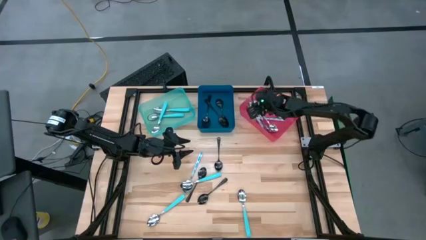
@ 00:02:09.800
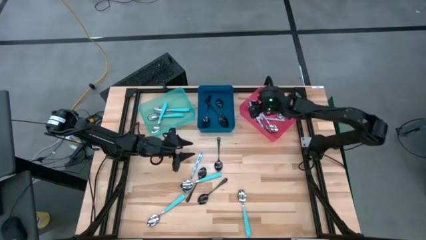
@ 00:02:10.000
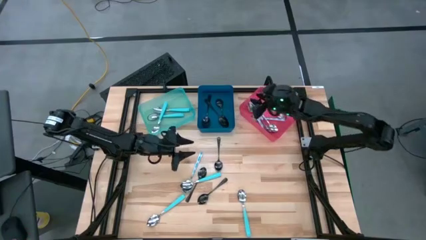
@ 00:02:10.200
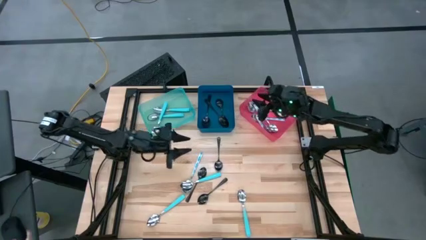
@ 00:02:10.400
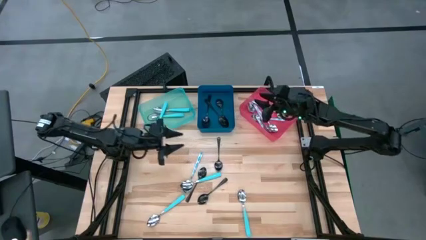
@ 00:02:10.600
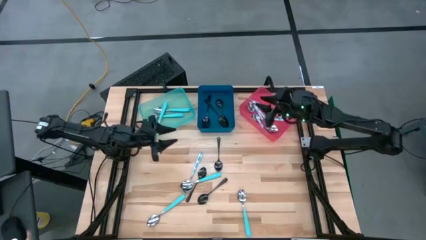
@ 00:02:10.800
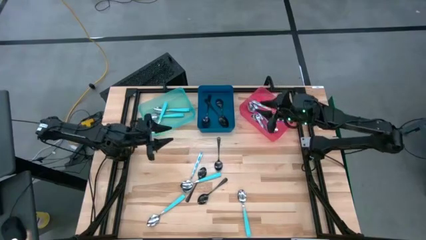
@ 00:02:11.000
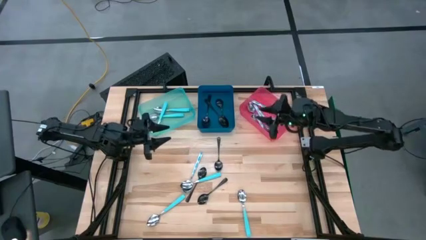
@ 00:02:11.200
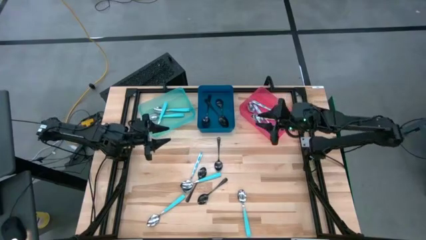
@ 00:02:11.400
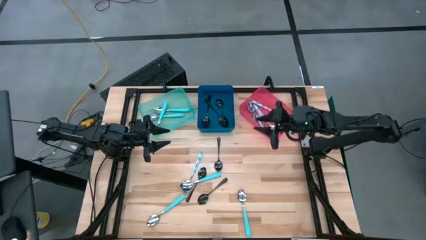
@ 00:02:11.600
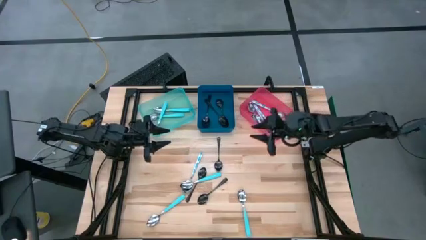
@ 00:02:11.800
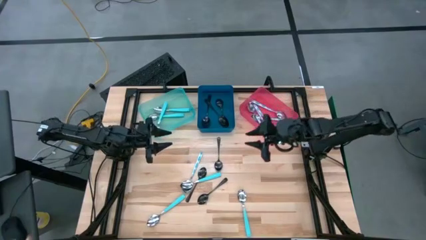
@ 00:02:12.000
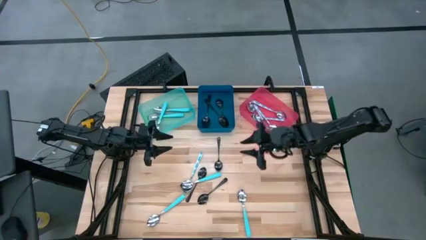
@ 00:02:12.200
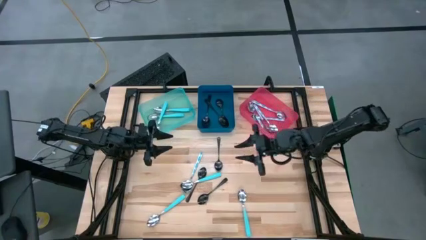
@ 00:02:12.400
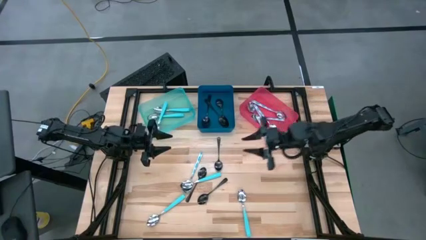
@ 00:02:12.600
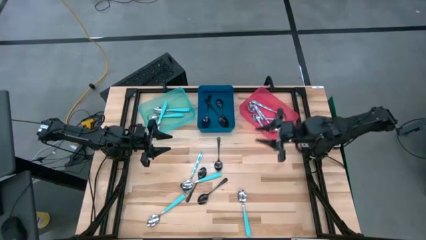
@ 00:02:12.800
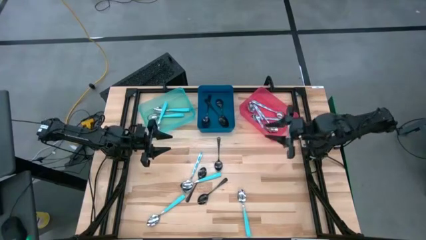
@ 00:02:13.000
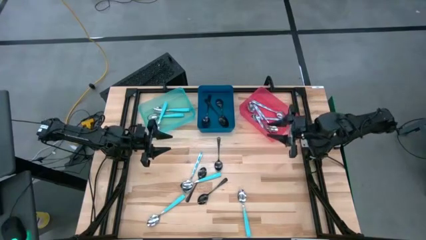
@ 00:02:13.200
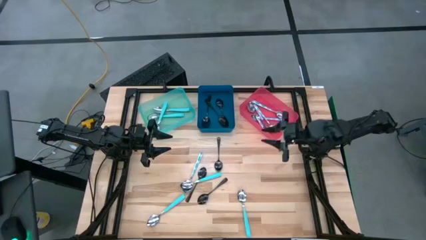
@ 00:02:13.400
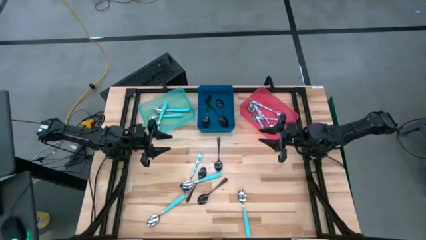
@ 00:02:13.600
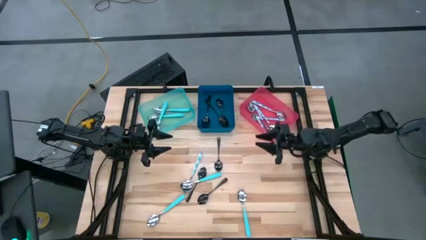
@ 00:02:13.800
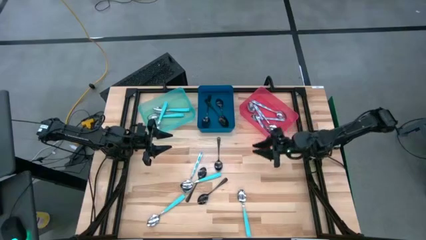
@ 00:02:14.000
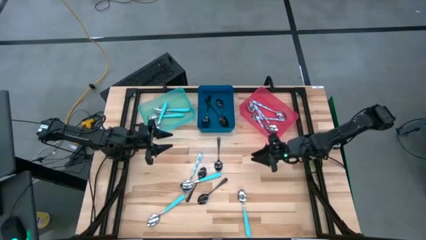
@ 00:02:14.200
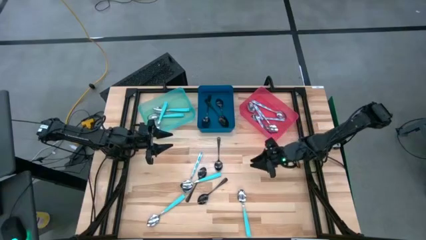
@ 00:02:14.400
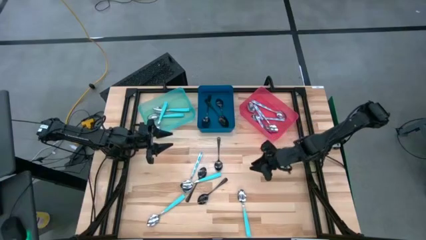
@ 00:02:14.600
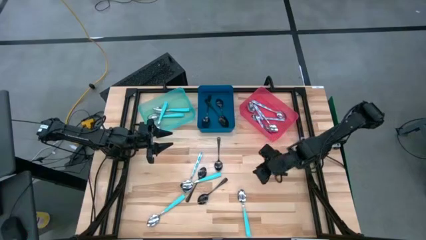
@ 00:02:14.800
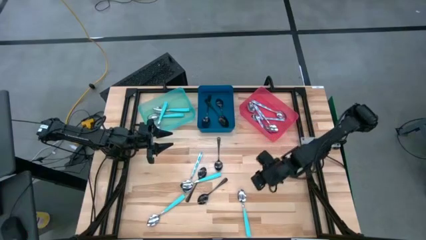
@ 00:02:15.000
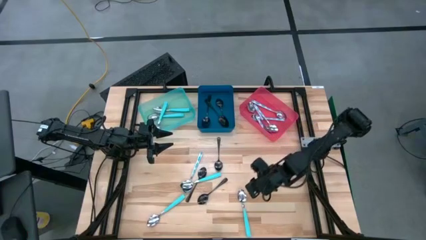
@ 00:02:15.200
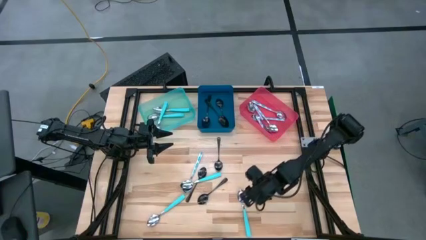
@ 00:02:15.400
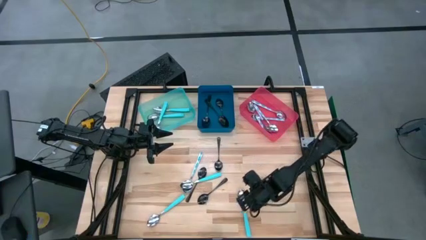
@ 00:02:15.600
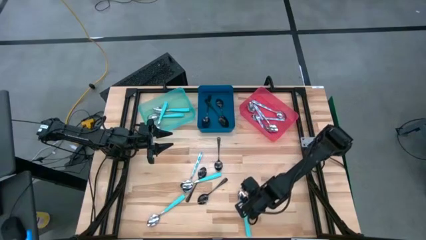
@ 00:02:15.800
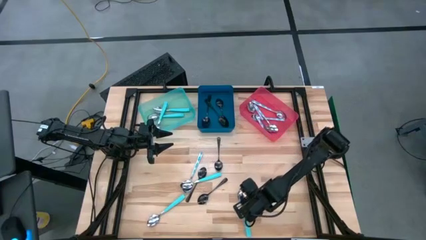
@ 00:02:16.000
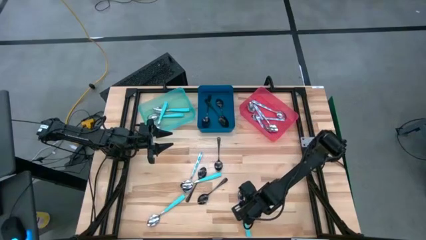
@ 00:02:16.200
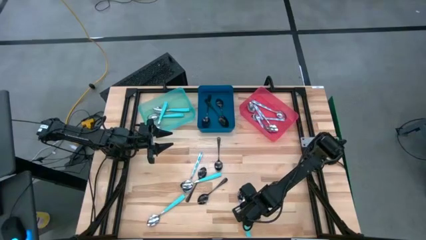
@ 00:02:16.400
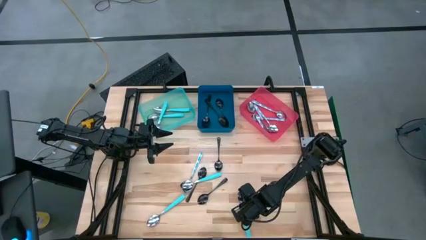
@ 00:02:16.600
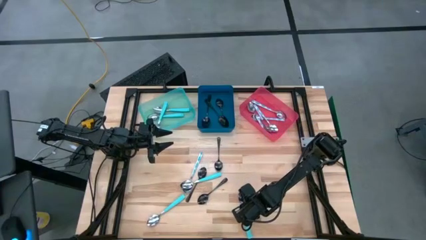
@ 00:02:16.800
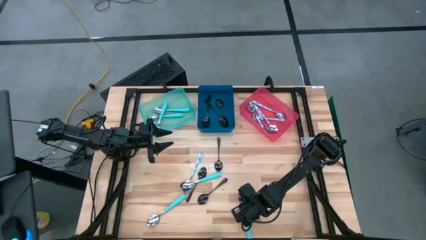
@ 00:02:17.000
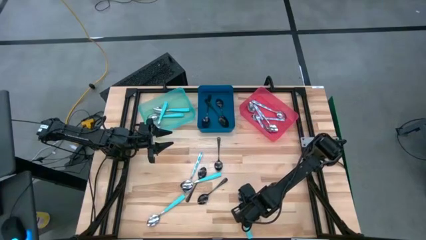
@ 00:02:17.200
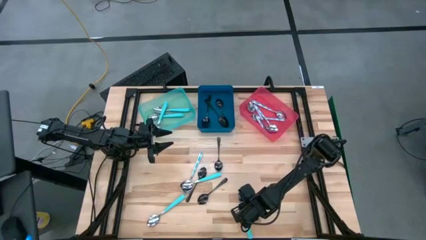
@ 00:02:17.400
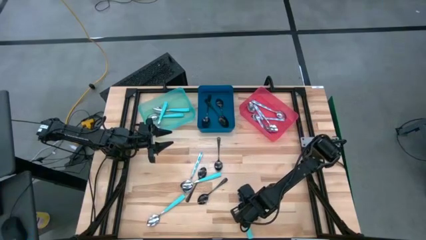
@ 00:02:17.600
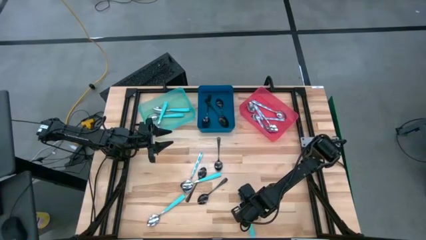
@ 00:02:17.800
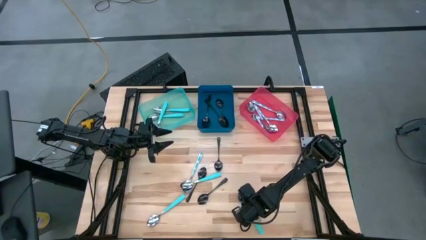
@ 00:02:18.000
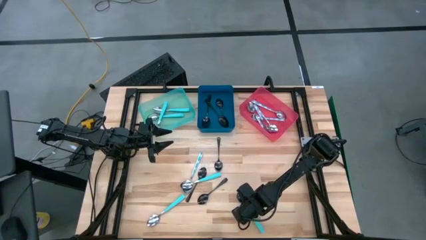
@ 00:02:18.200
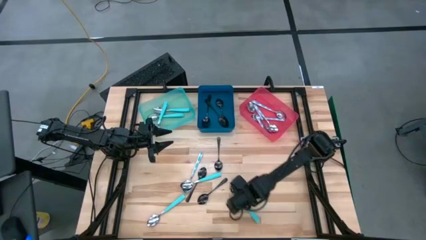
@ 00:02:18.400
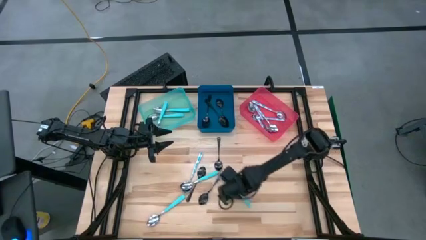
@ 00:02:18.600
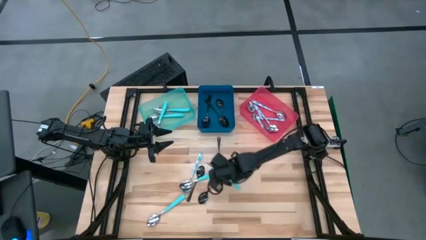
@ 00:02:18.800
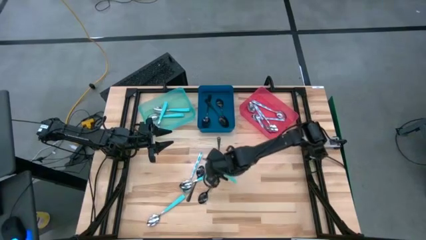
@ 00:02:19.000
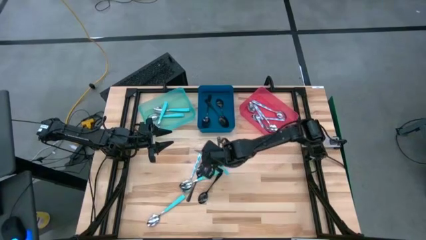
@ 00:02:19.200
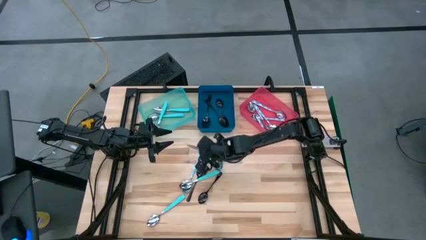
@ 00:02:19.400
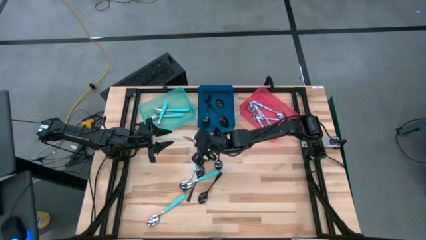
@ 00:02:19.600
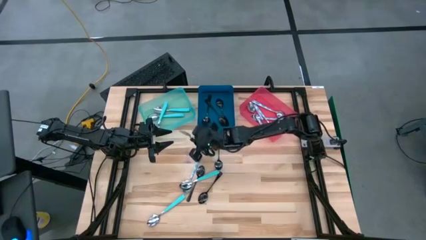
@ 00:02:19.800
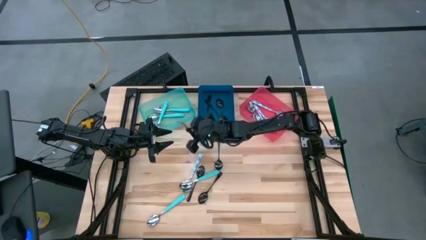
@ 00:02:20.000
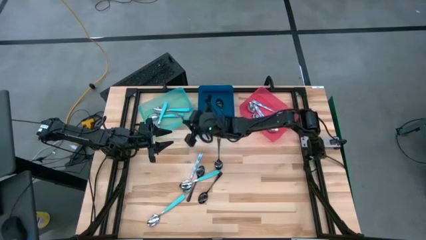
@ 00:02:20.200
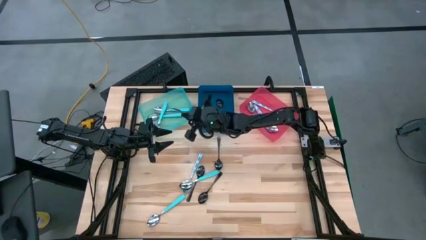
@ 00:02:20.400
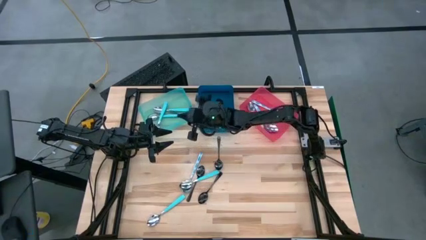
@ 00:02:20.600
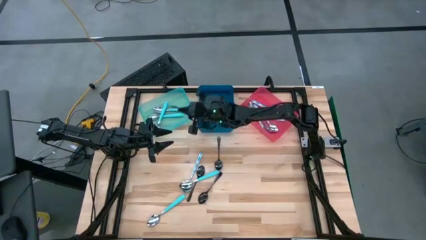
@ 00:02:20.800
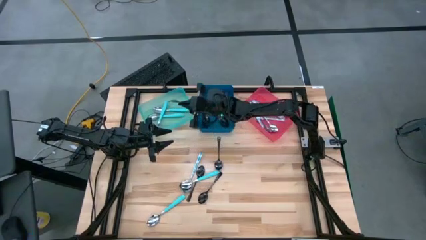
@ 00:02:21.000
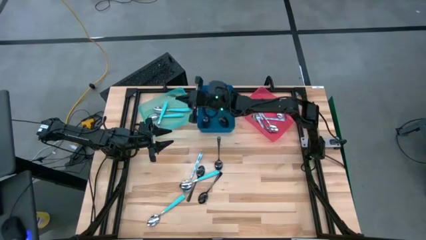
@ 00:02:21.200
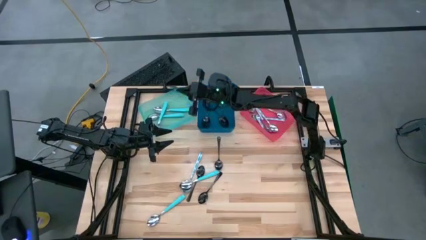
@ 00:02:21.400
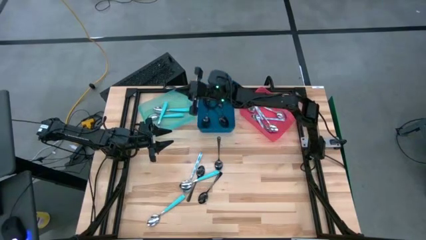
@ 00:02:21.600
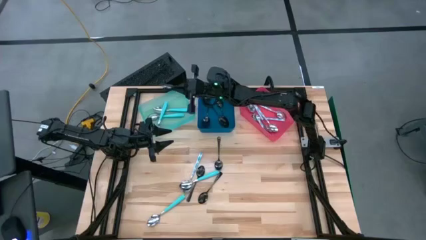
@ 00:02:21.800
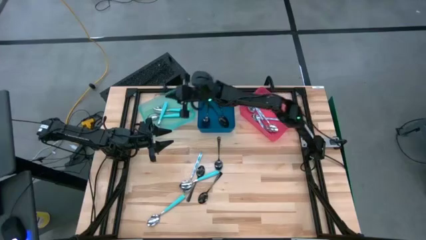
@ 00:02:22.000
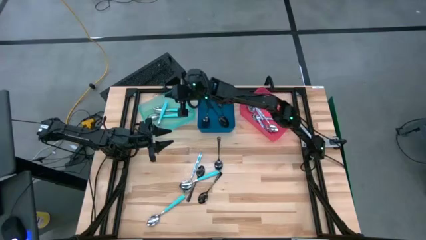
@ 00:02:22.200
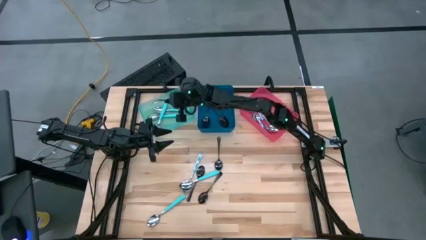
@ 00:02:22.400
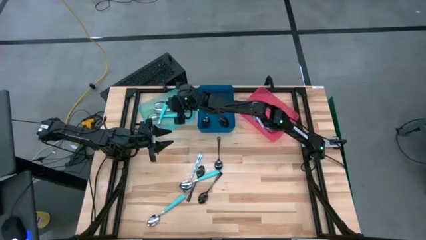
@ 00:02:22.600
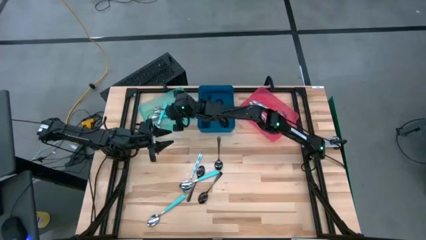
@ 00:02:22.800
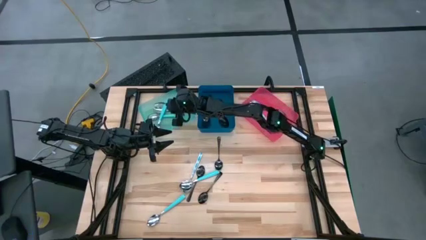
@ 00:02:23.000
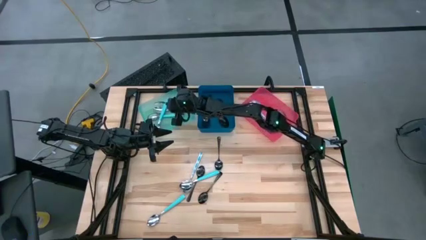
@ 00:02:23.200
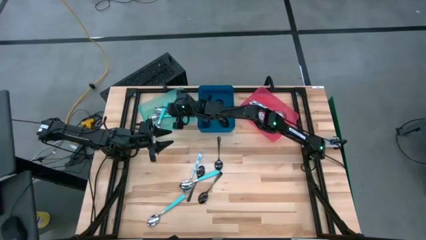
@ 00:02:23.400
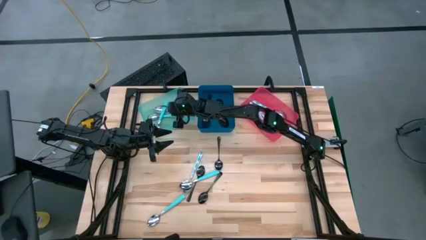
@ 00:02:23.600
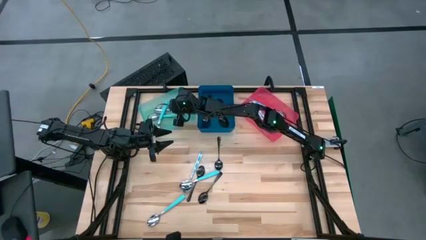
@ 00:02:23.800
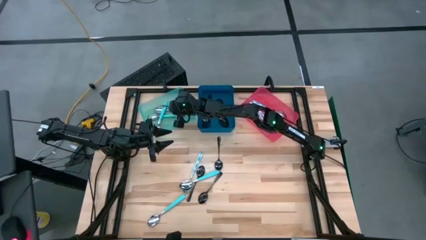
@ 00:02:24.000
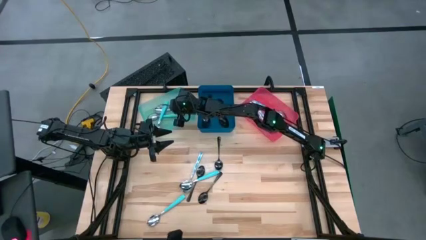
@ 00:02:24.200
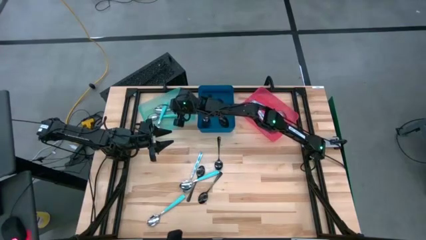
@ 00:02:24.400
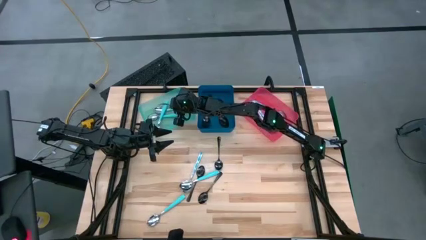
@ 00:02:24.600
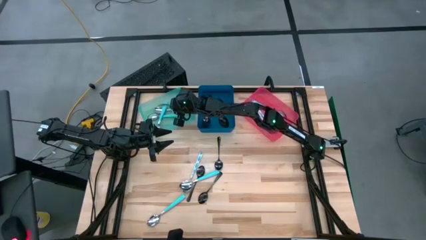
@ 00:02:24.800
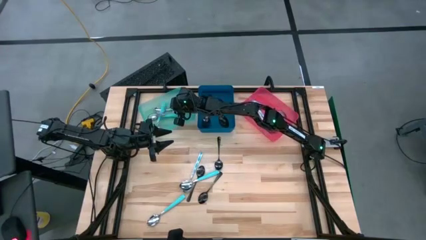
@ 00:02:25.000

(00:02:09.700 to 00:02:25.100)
Task: Sort silverware by color (type)
Put the blue spoon into the light blue bin
